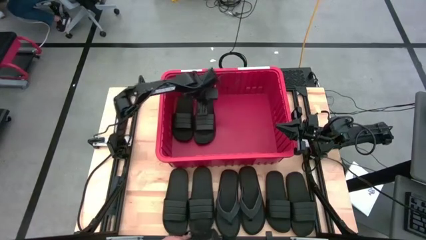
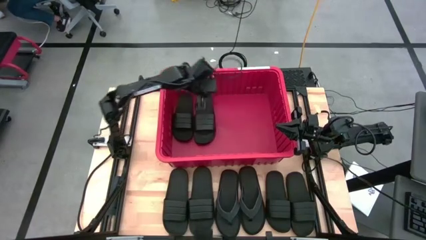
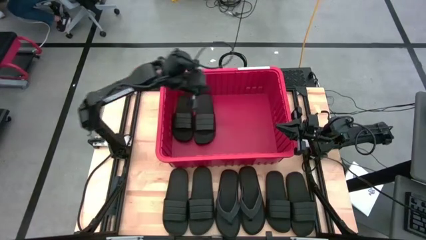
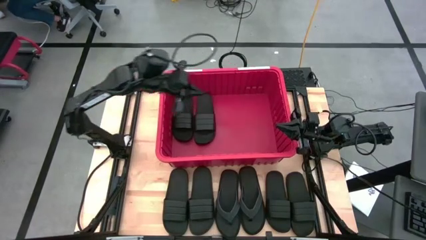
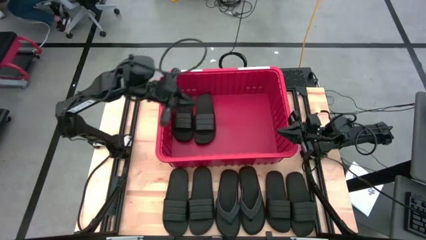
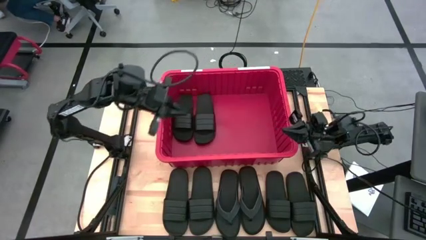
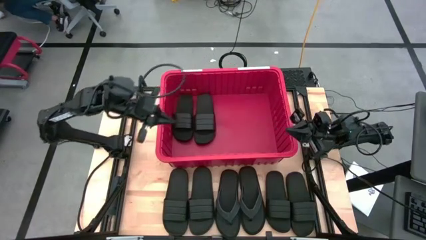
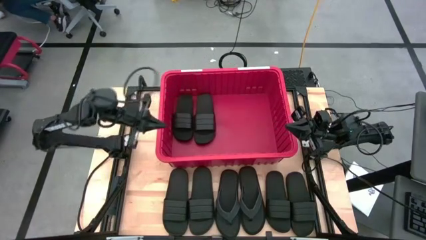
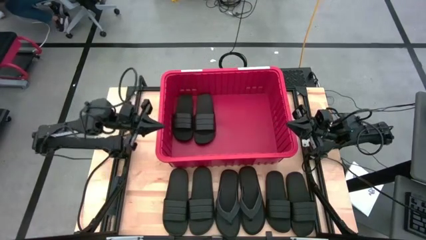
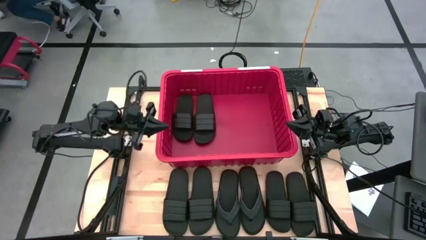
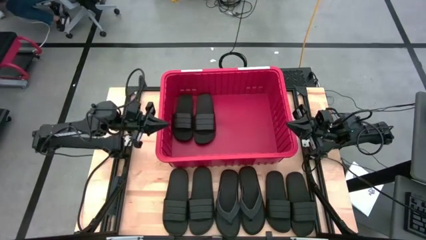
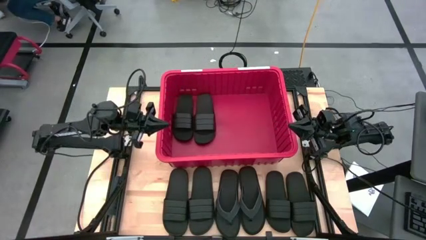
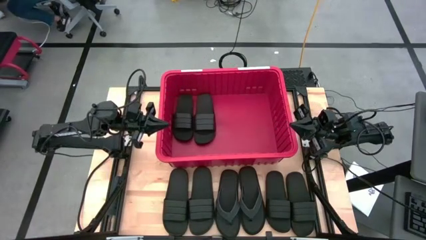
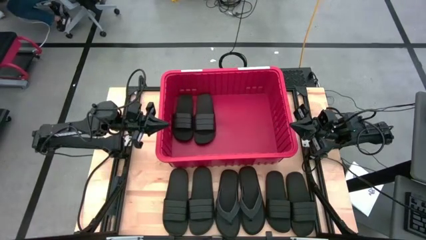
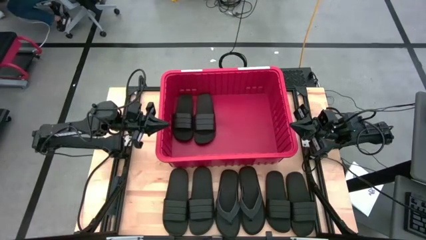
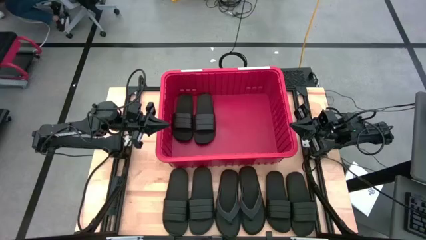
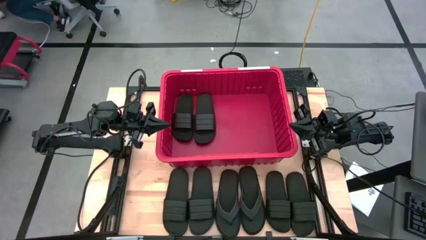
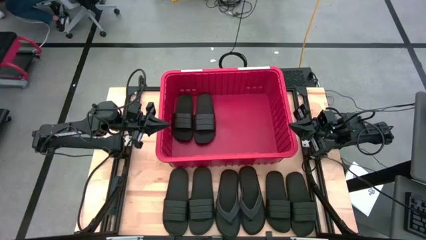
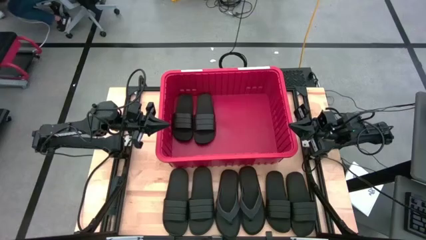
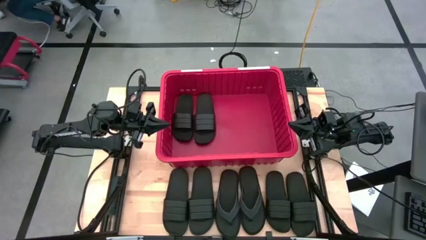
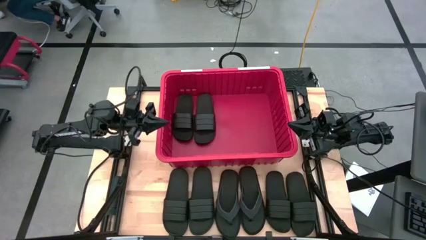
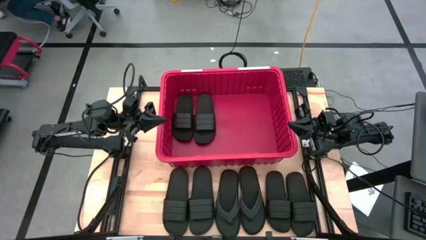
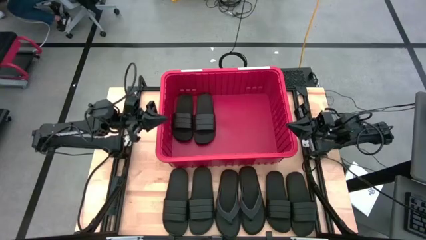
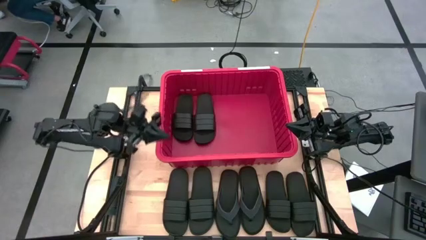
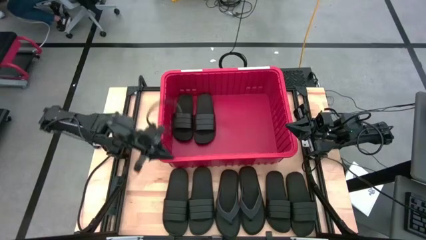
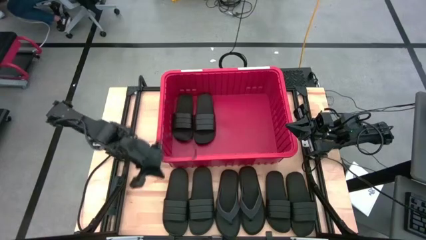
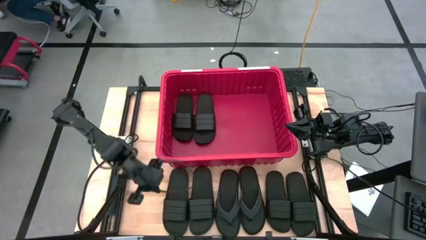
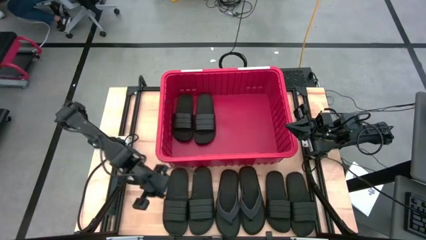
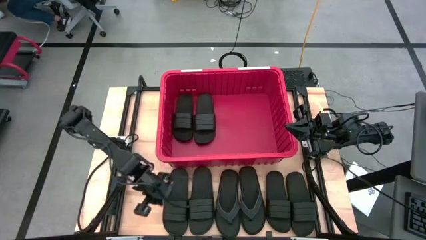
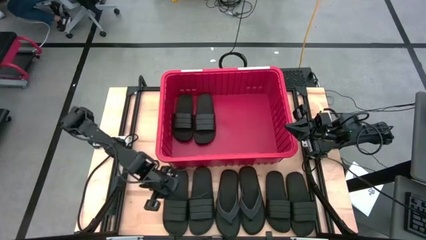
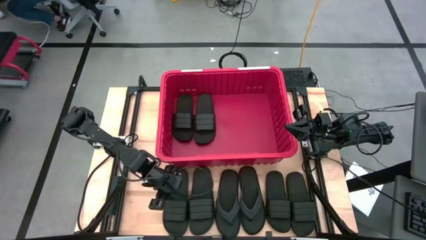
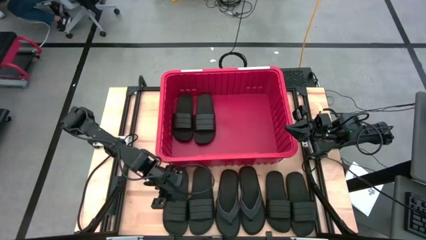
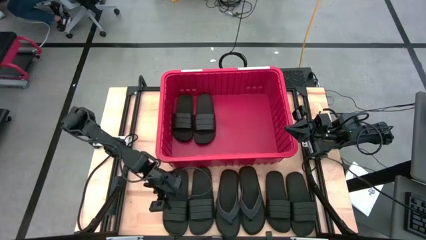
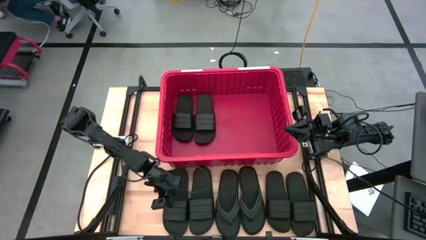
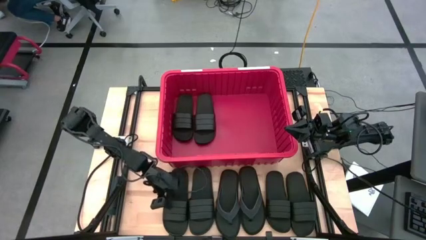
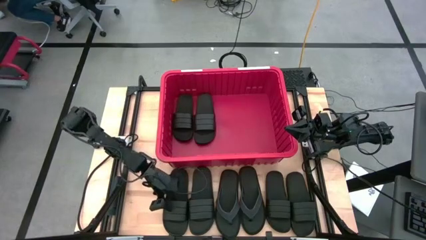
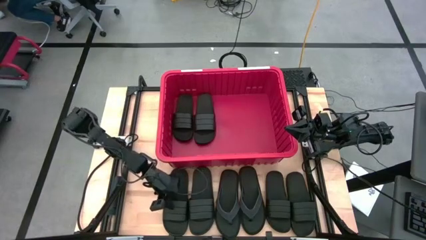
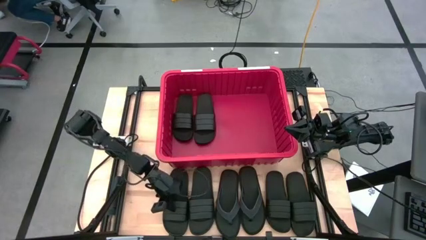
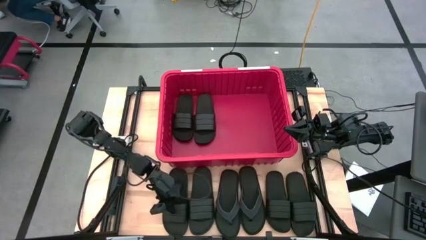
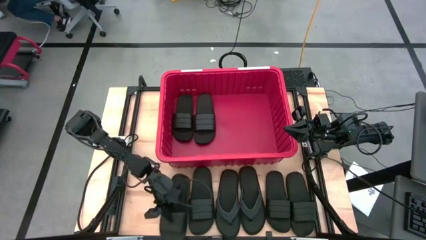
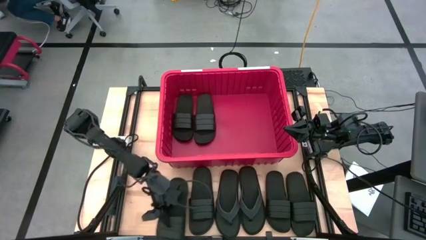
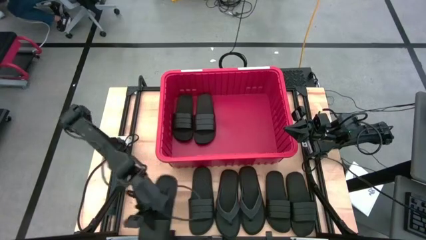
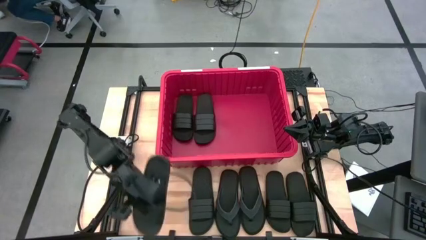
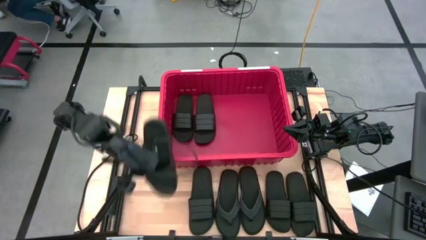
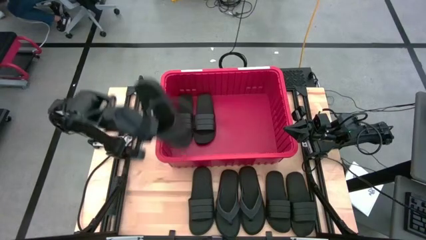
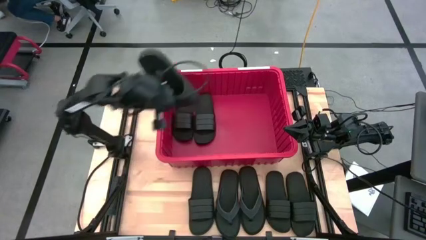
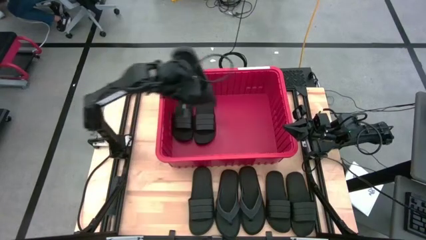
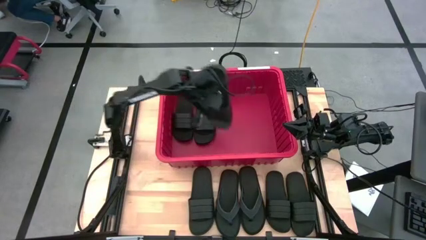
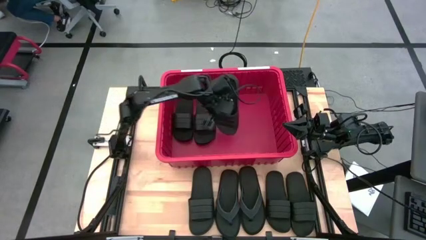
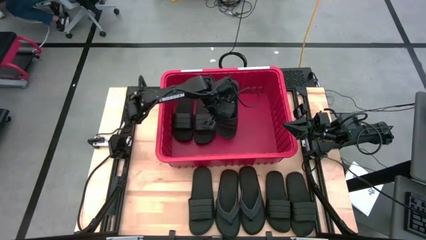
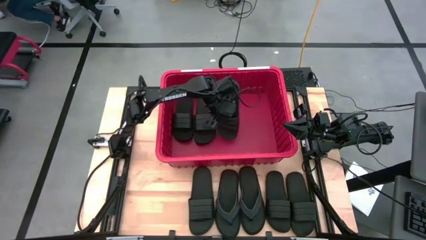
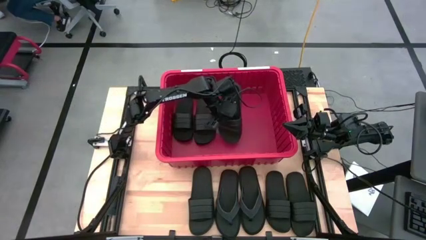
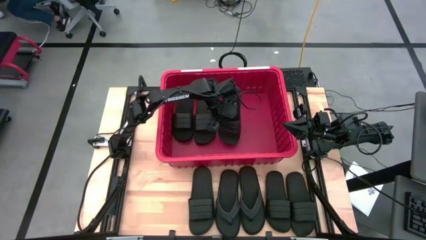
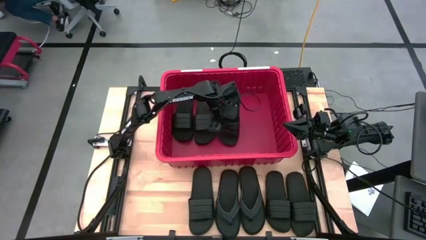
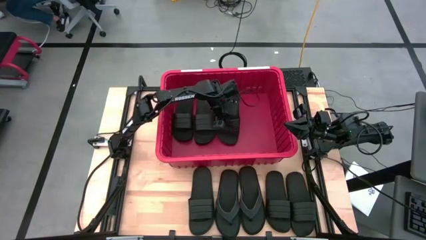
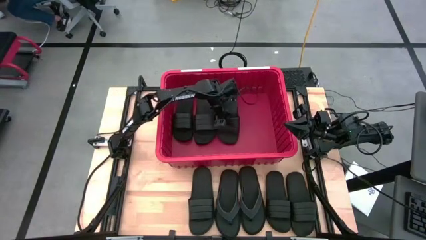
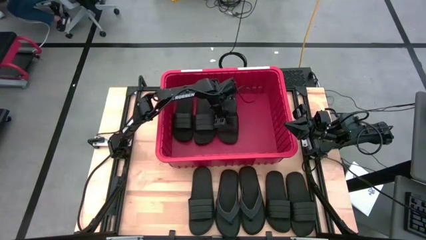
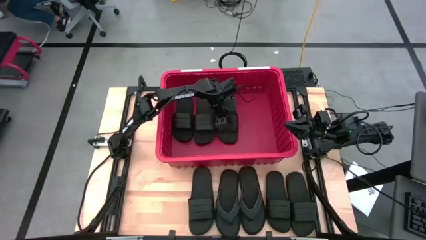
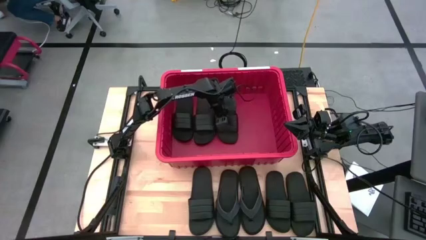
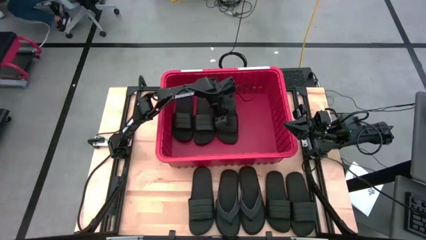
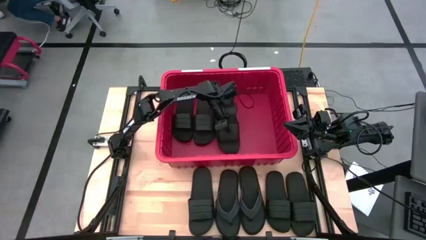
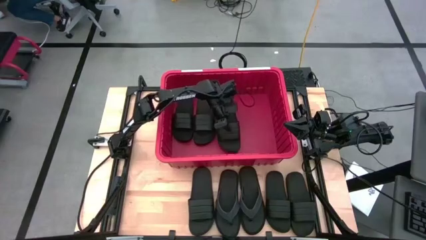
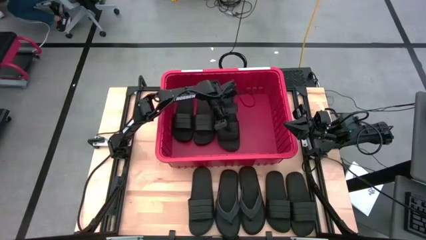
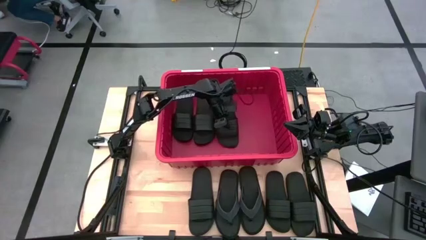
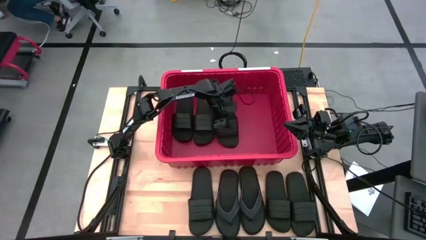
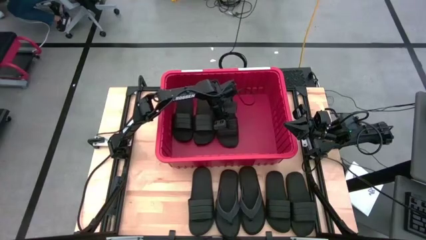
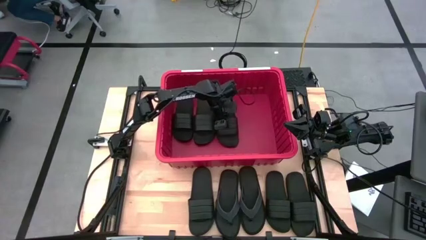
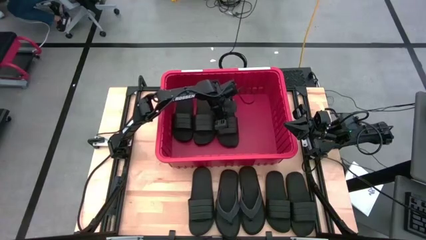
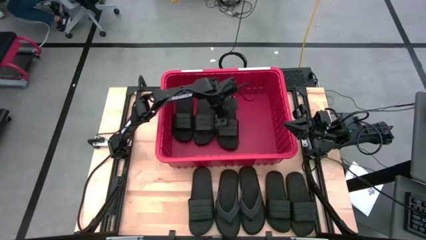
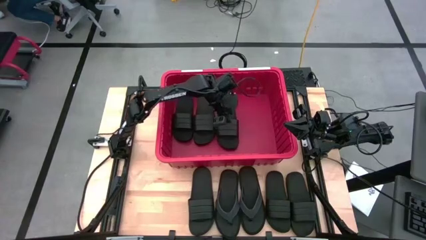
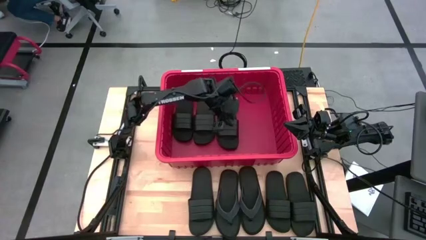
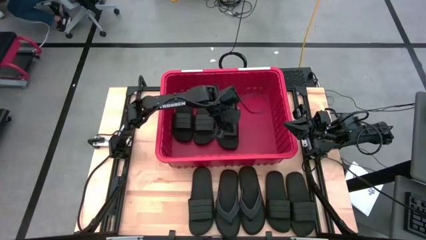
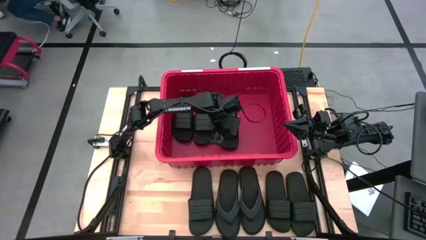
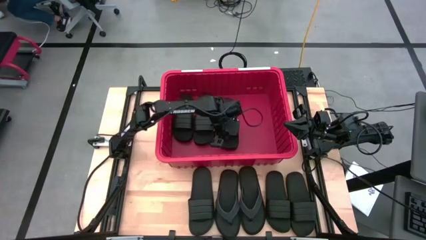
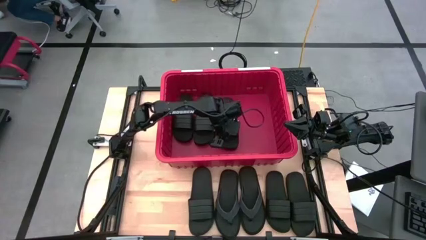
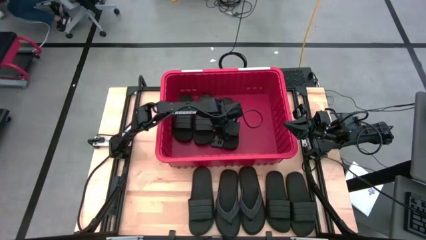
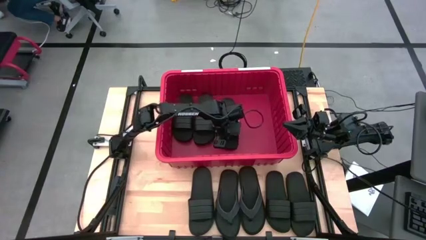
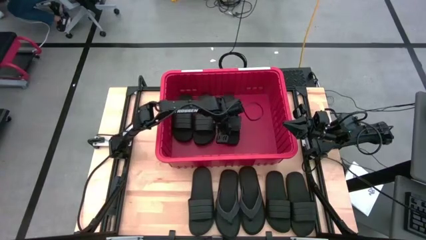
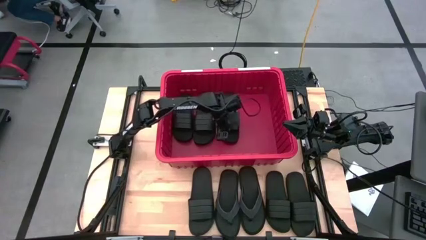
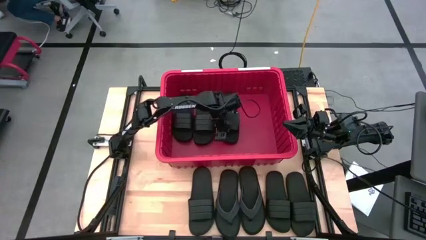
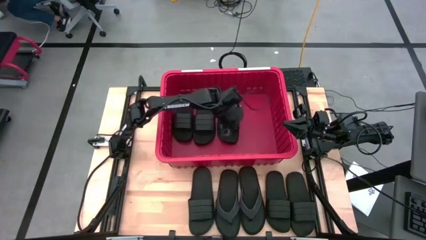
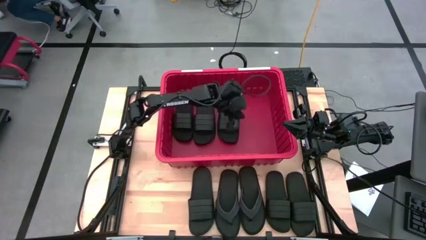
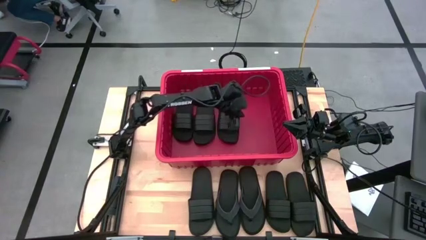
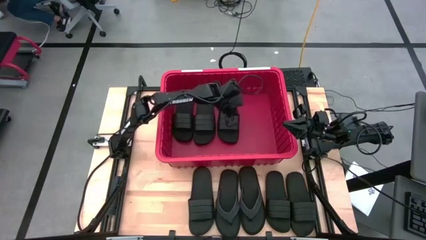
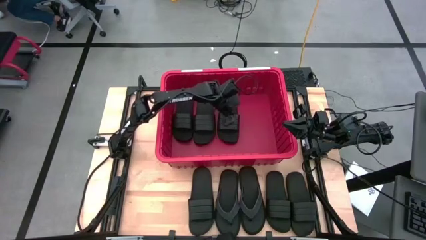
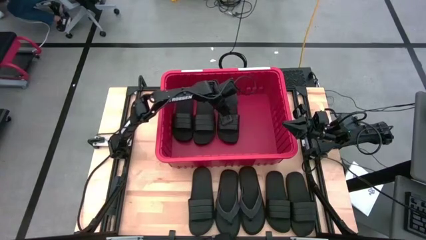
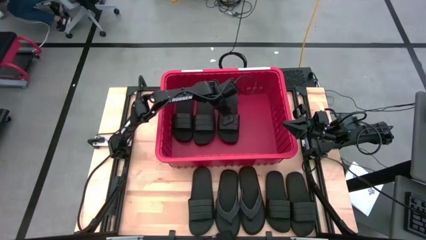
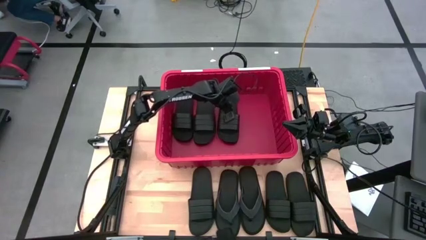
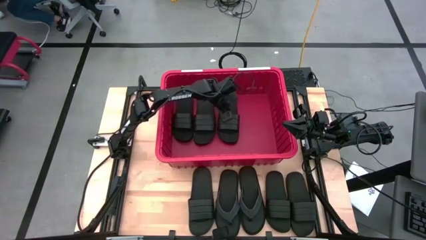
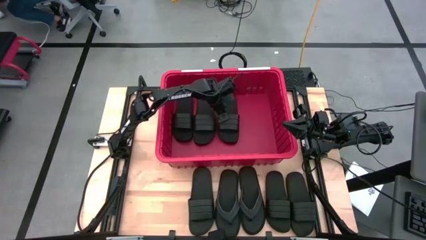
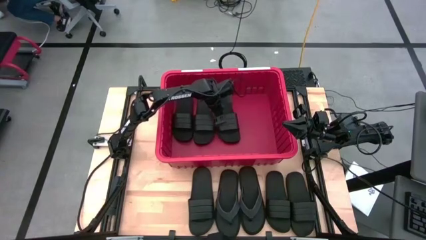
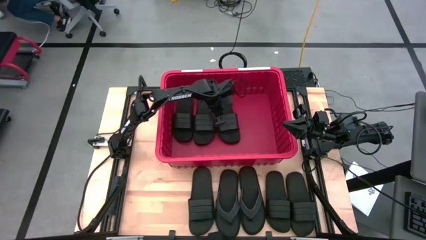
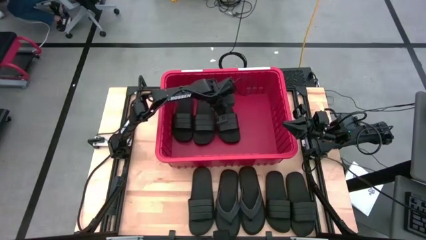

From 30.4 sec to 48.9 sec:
Task: Pick and place slides into bin
Put the black slides into the red bin
